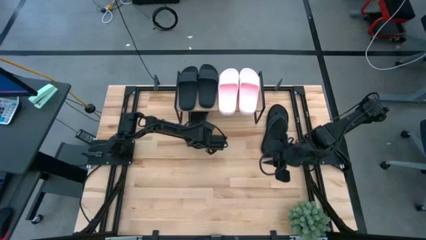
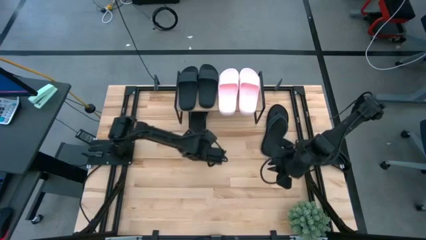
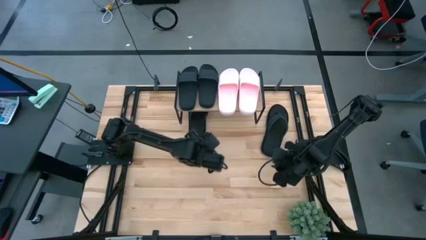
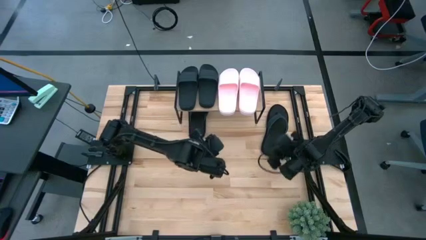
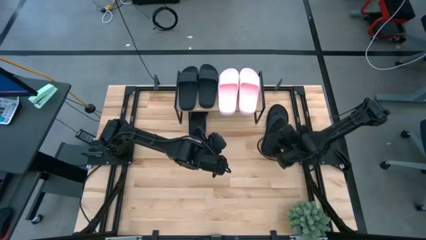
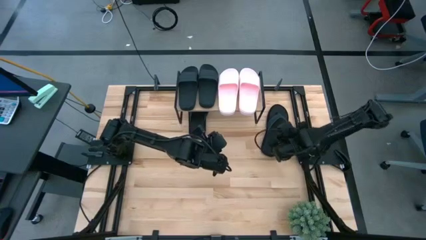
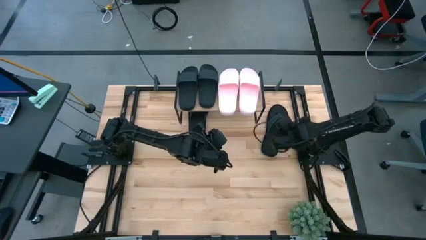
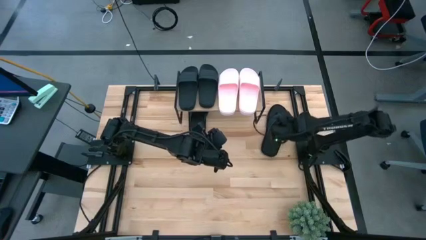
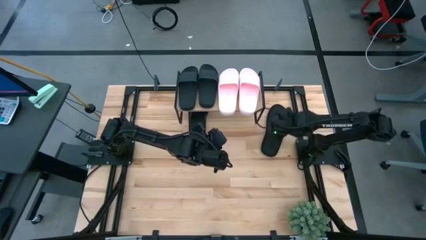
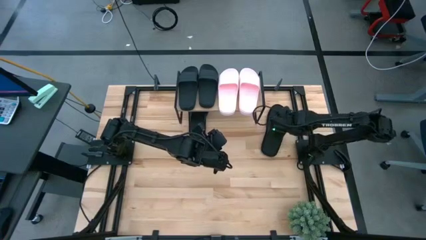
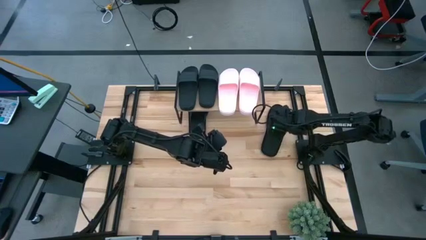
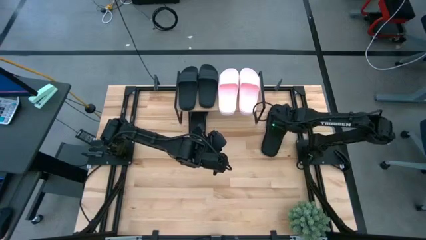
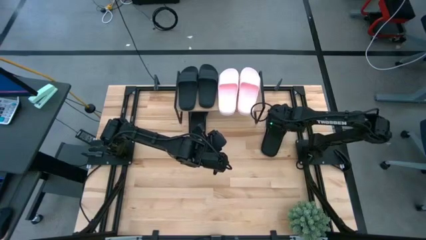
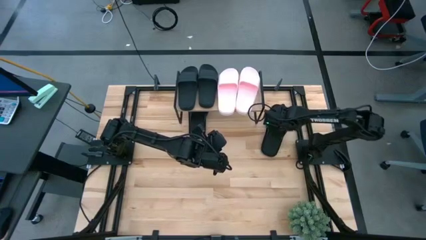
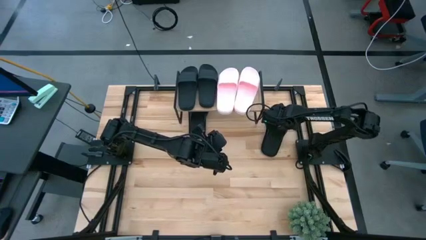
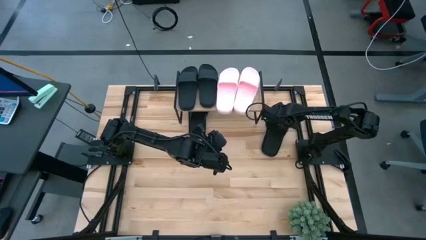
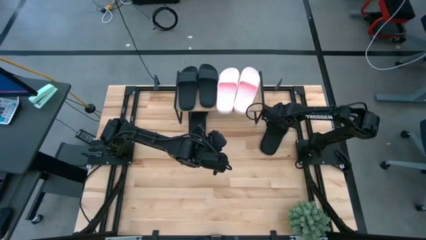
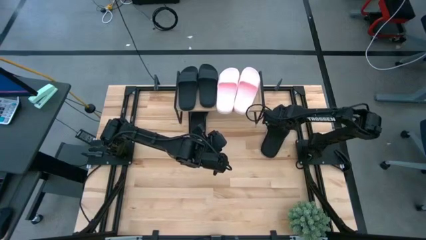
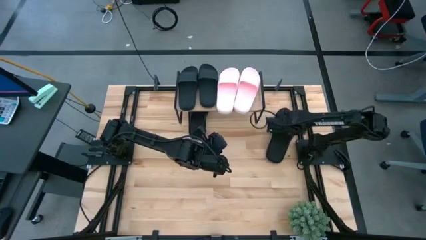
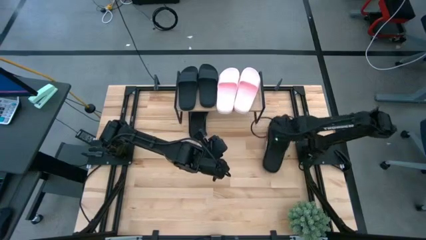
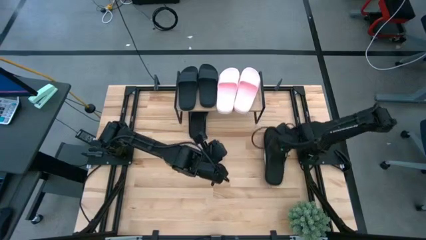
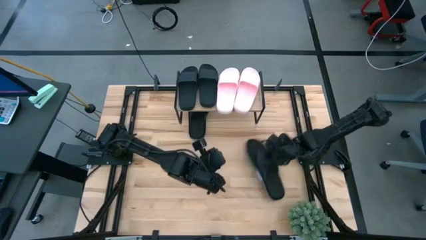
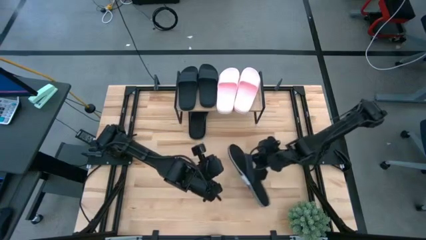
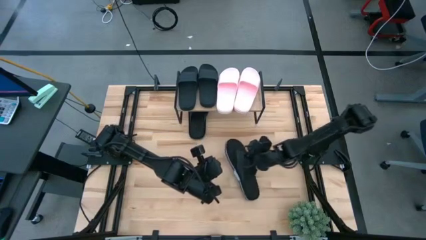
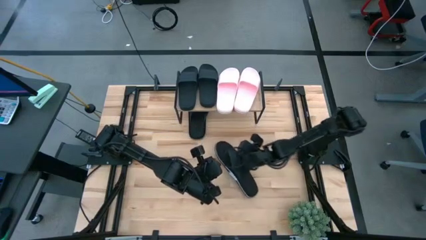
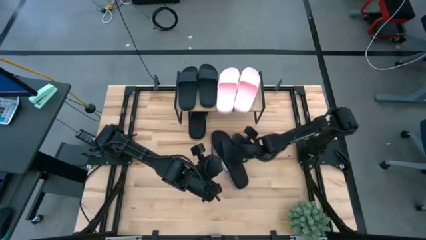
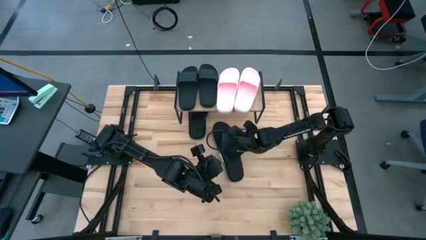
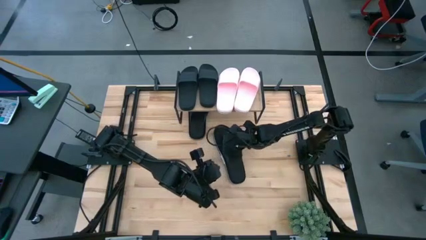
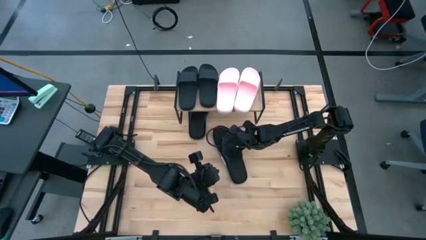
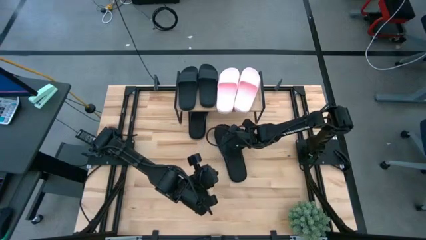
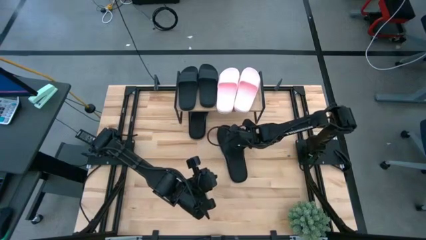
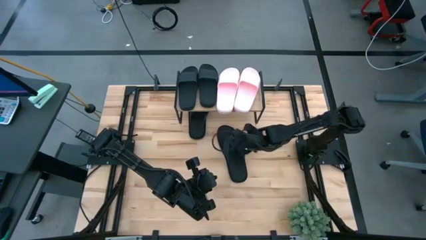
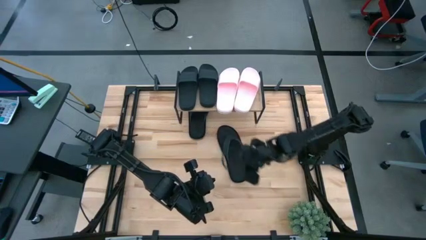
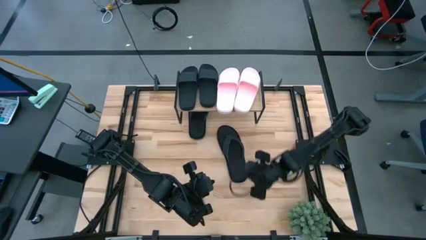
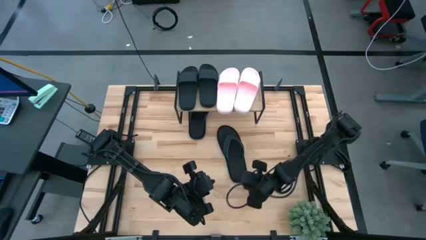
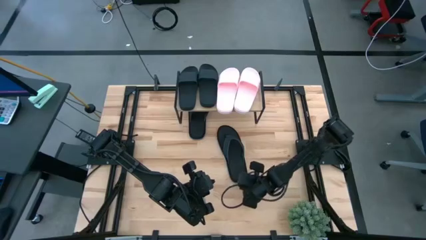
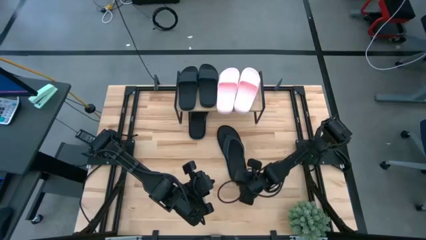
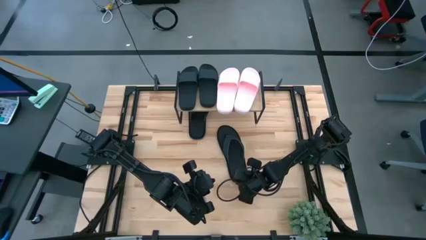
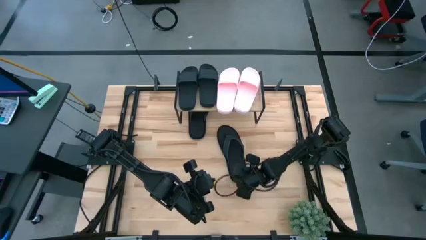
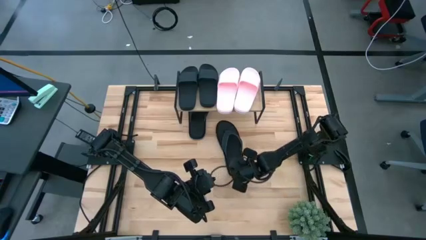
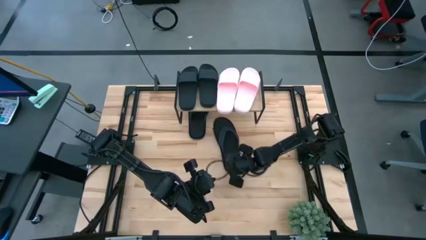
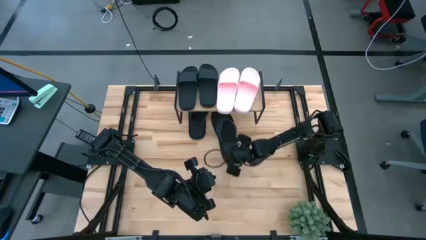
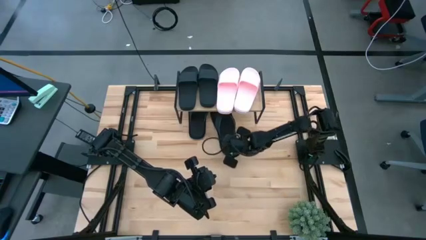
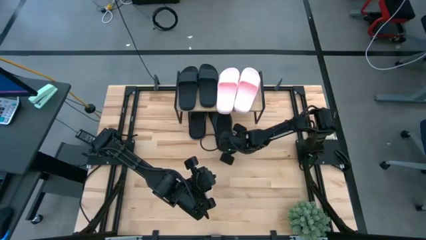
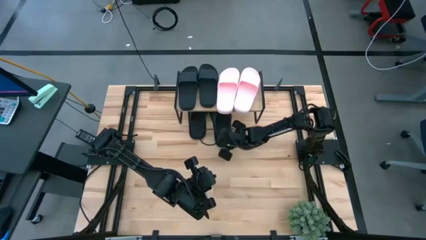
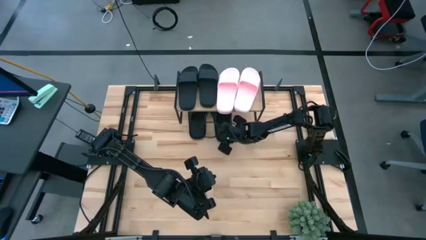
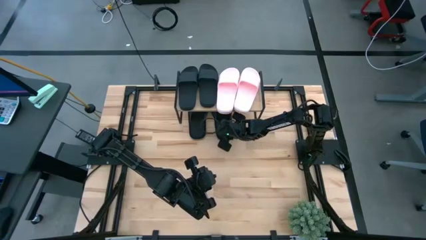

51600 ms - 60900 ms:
Task: Pick and place slides into the shelf
Put the black slipper under the shelf

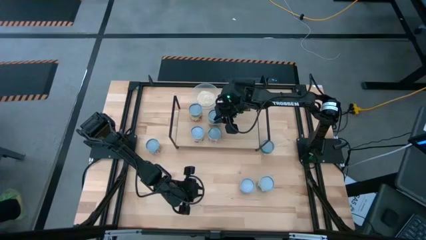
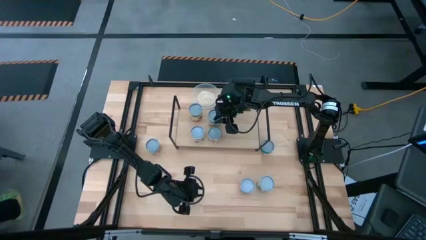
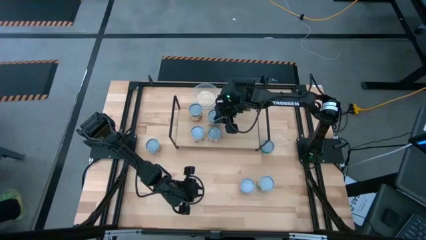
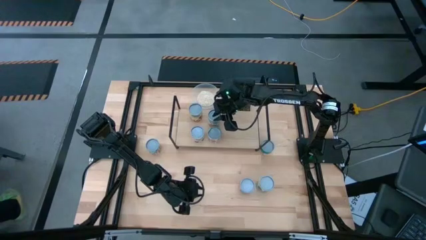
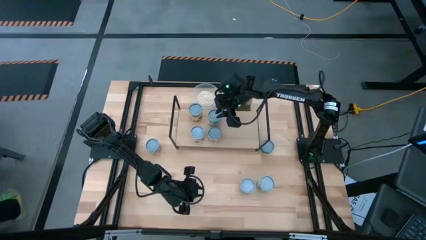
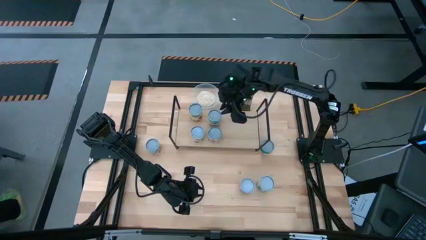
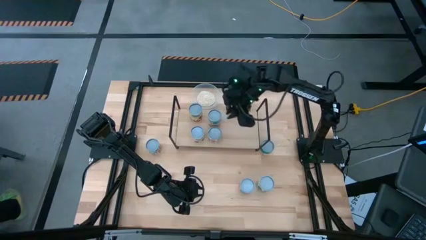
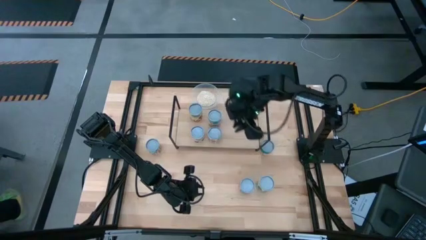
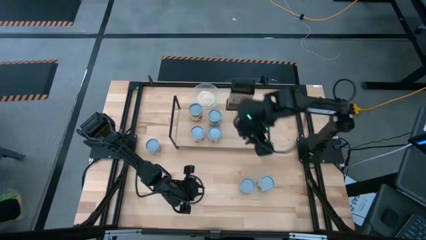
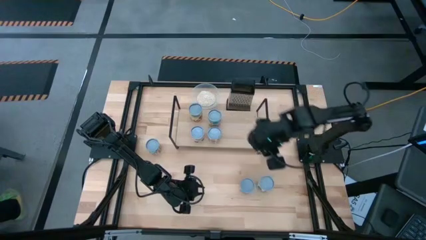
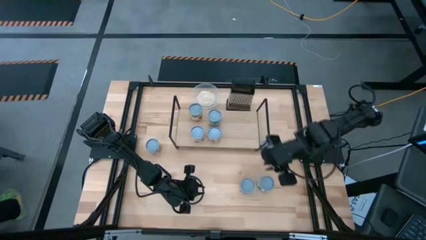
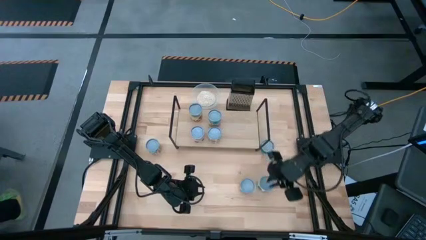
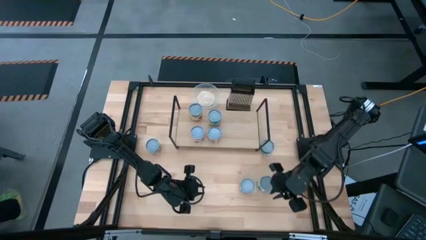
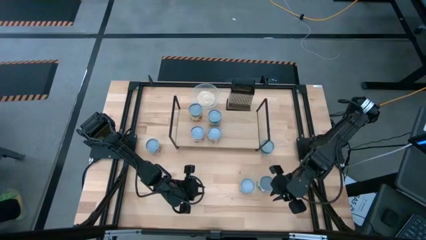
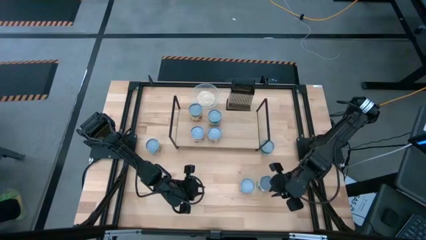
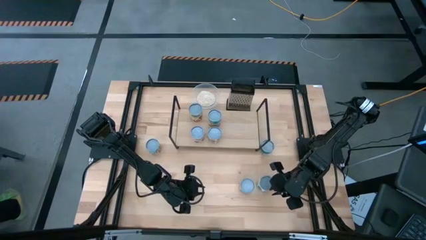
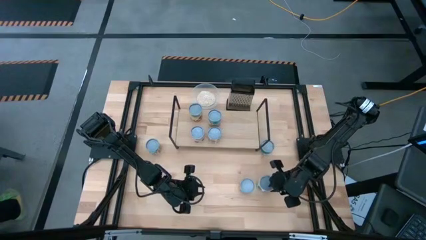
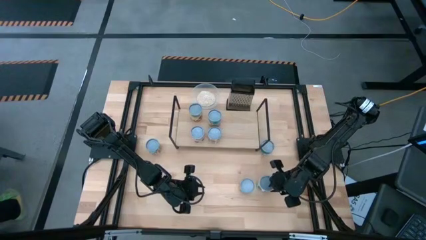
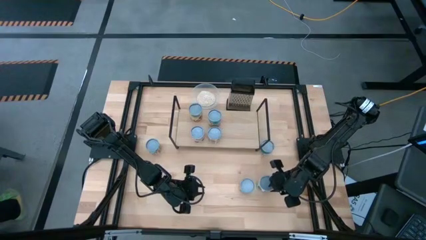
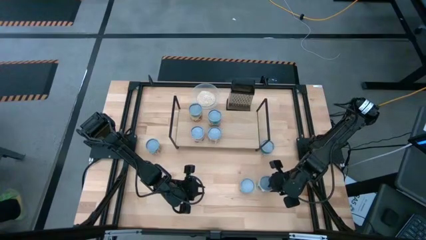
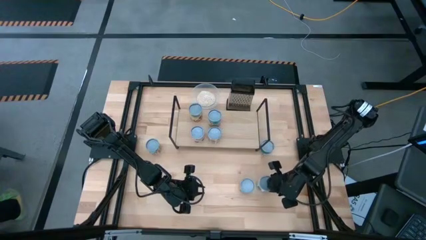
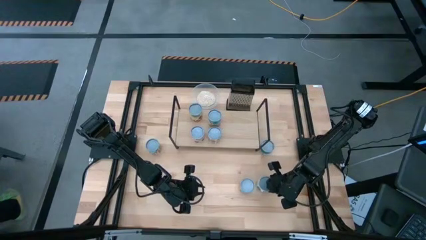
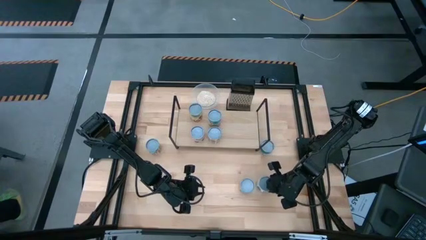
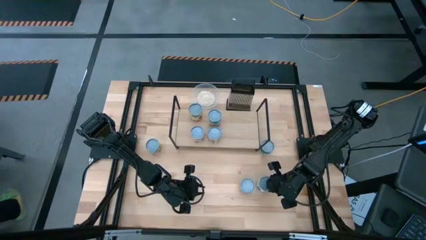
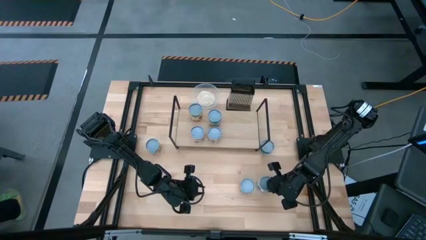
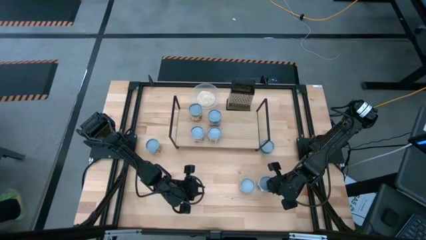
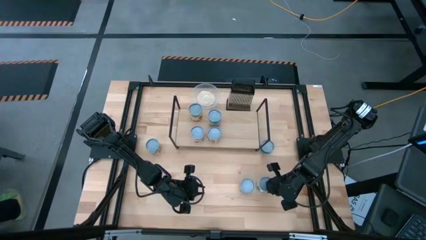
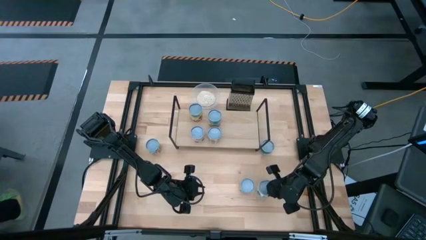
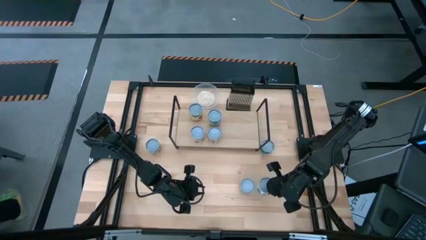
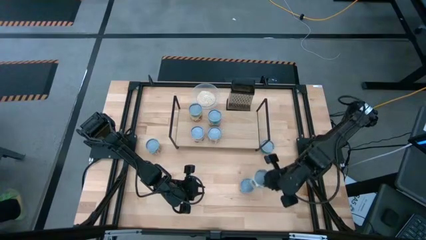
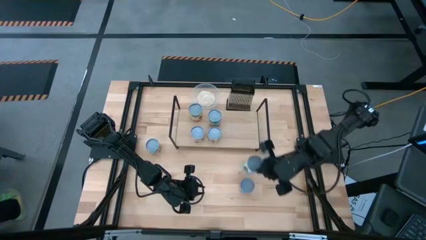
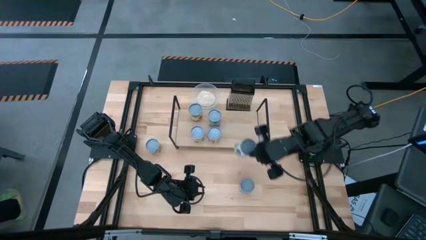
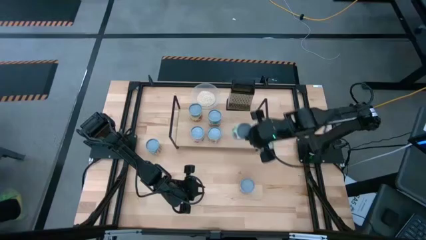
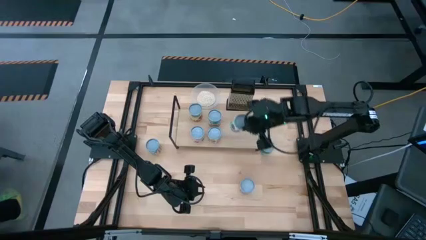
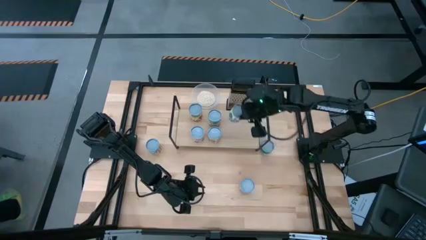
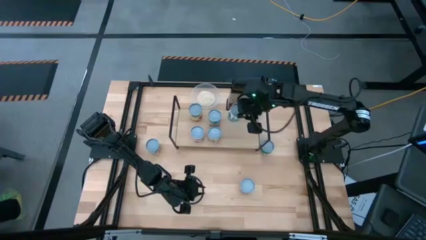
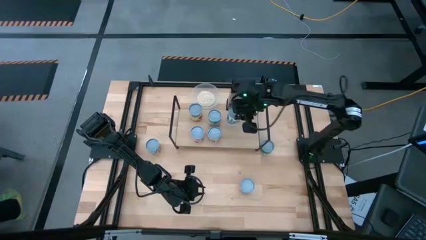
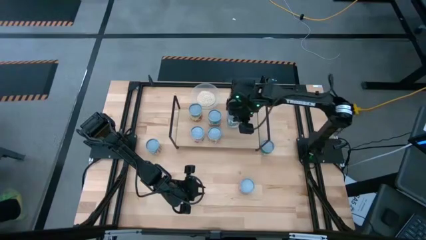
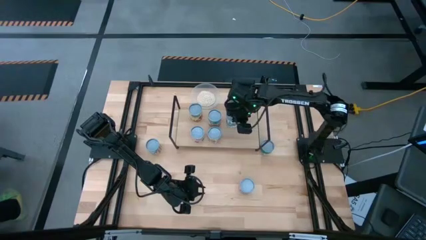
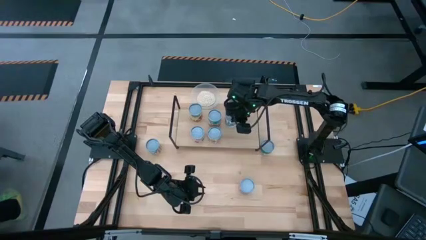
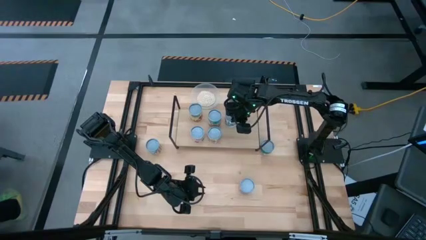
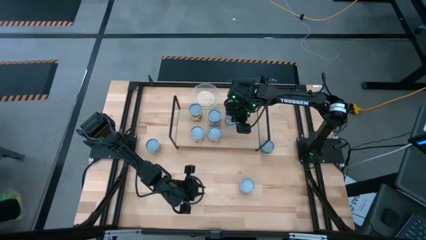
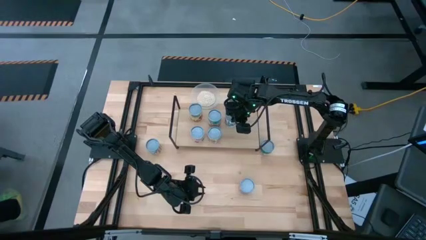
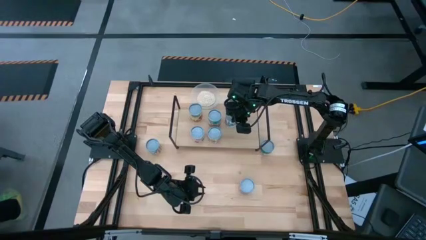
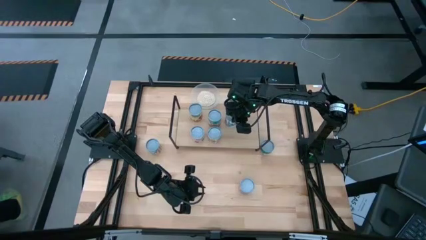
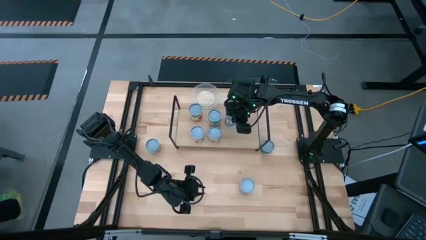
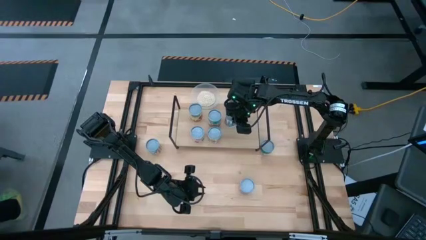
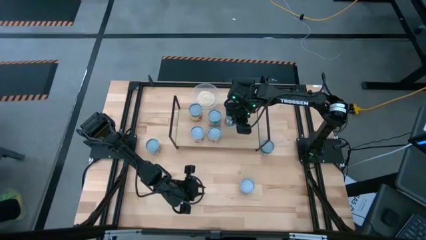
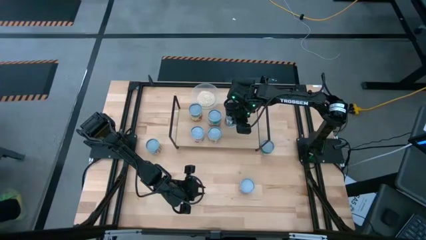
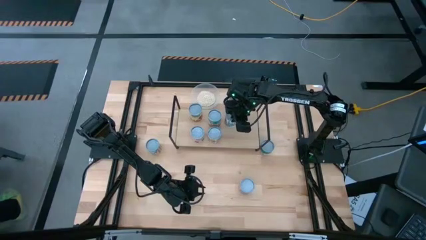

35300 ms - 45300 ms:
Task: Pick and place cans onto a shelf
Put the canned mix vegetables on the shelf
